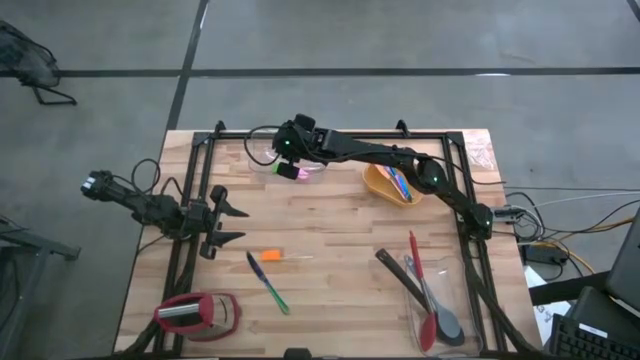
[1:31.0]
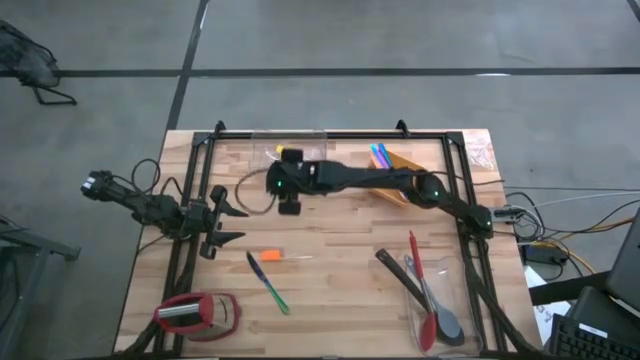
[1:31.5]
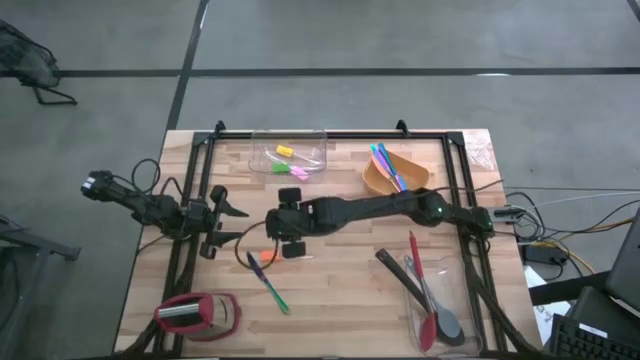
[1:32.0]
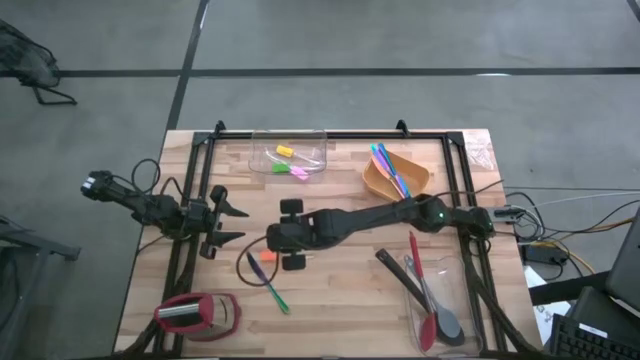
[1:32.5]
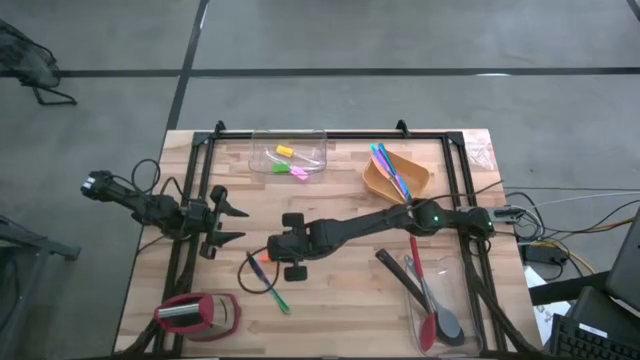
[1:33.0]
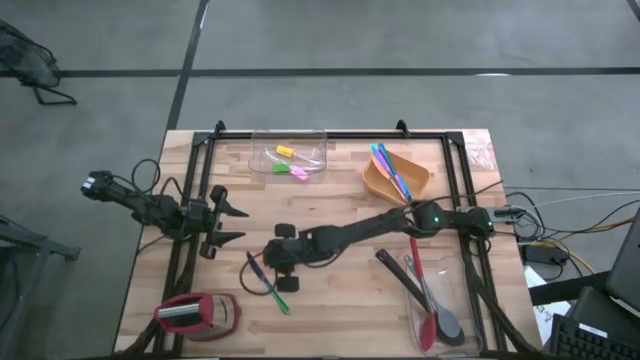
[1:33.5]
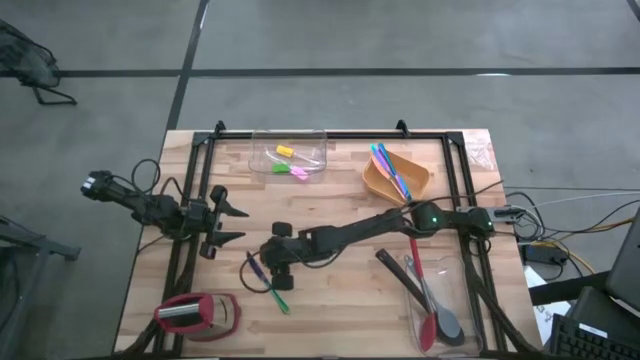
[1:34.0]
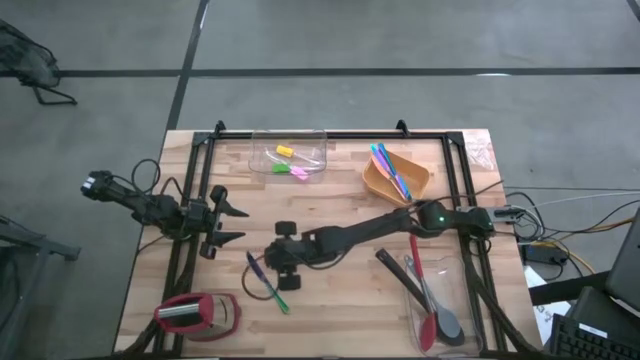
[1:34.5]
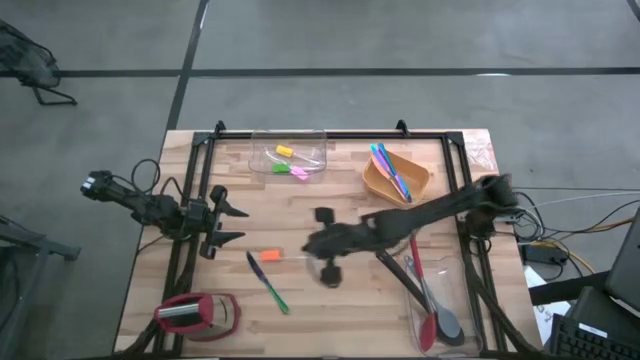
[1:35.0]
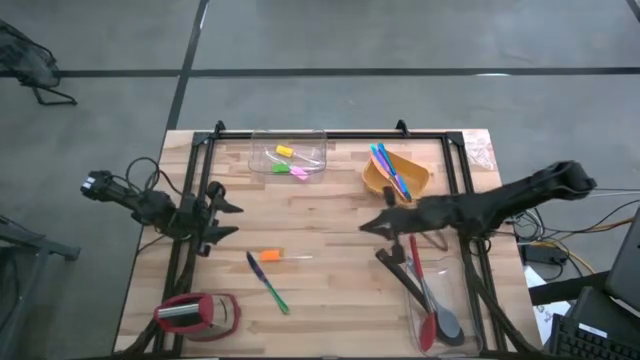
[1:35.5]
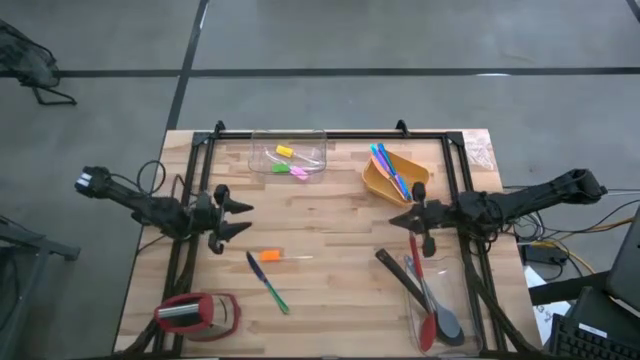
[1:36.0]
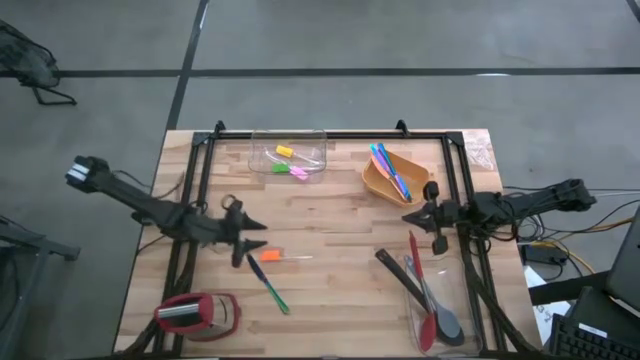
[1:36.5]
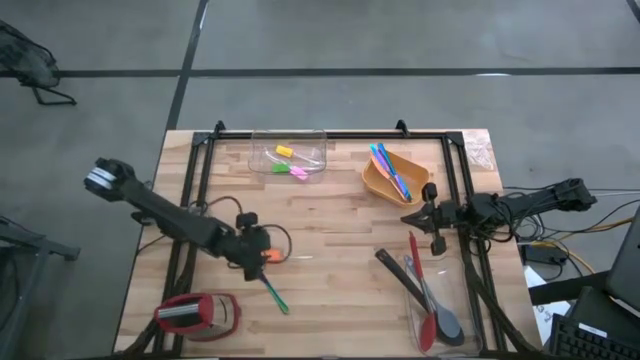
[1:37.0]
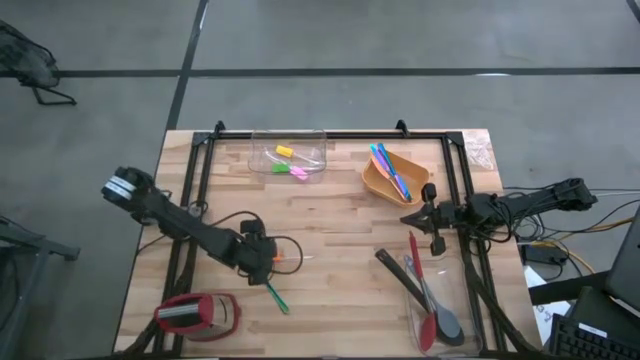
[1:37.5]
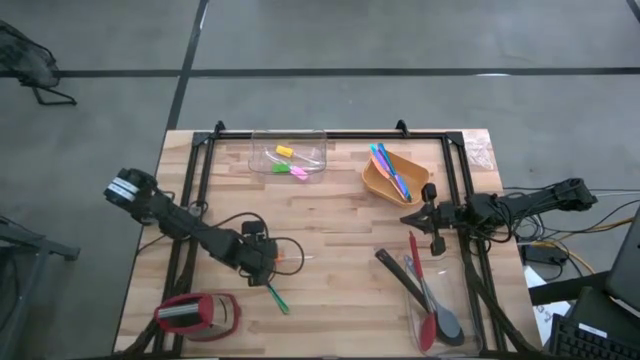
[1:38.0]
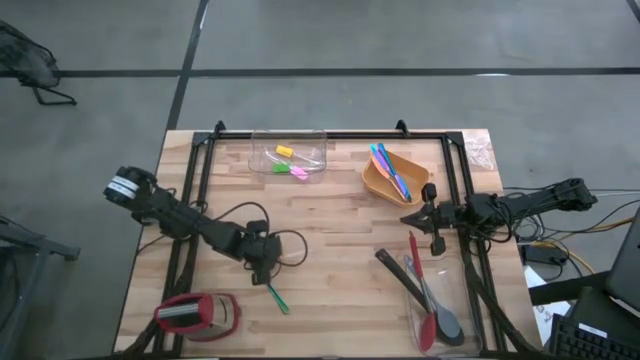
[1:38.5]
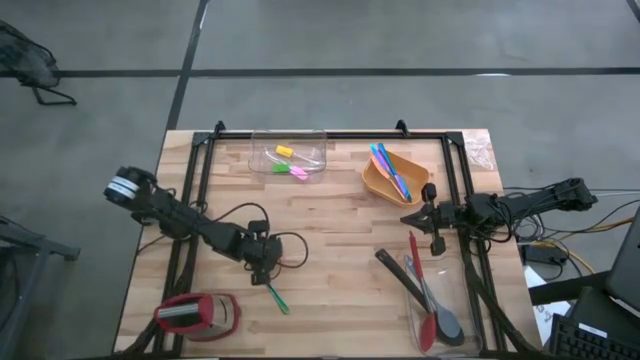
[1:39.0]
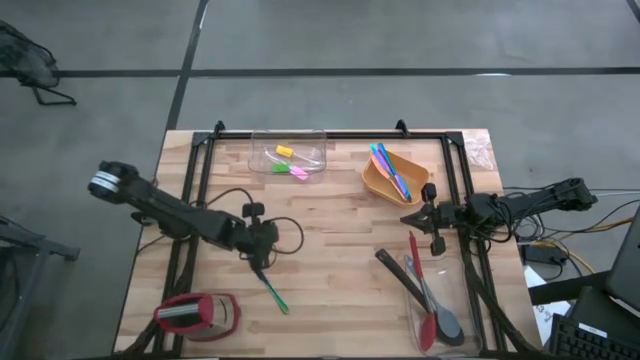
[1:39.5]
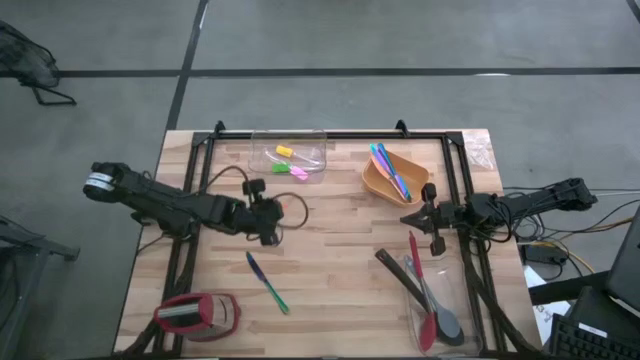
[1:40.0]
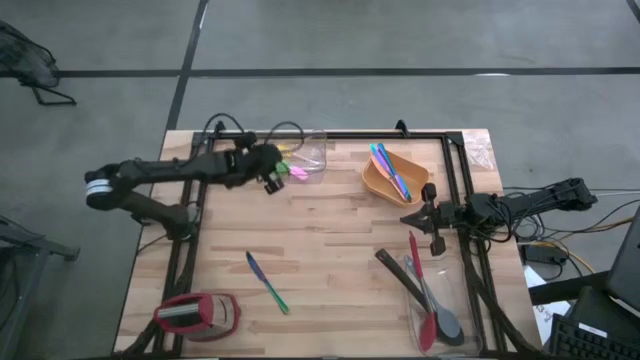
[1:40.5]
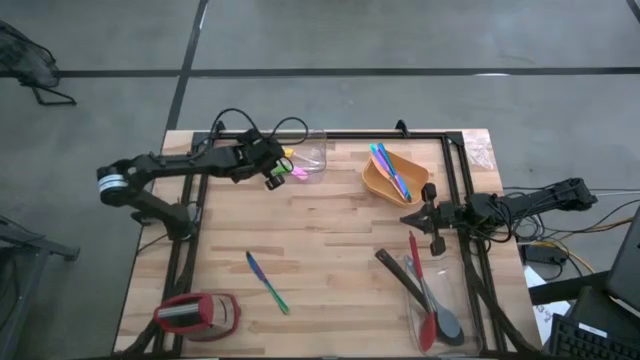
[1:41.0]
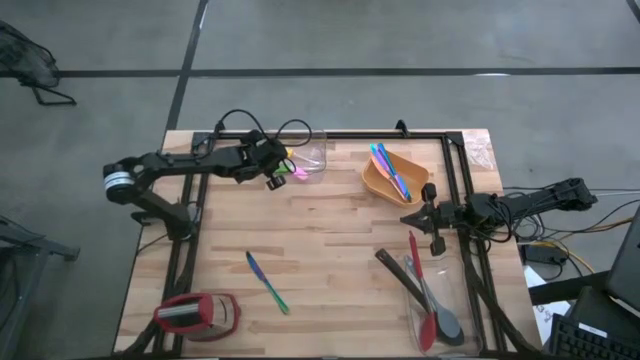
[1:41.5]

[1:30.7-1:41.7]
Task: Pick & Place Kitchen Items
Put the orange spatula into the top transparent bin

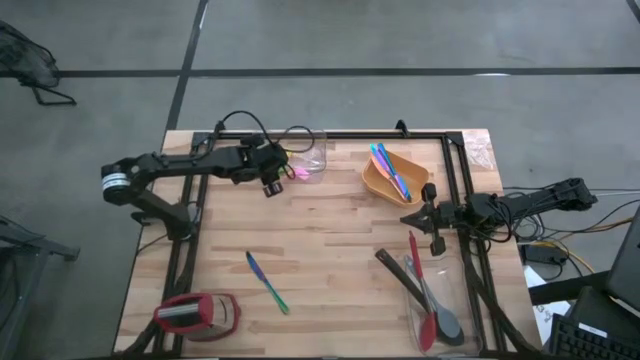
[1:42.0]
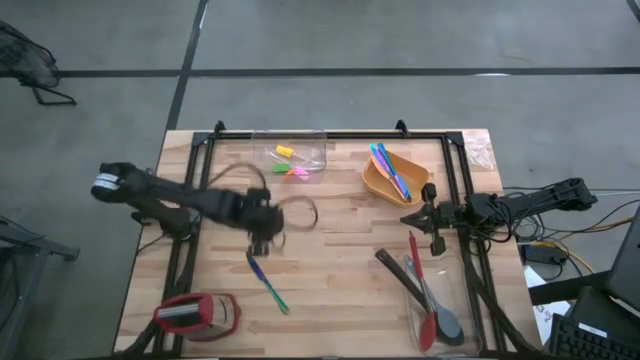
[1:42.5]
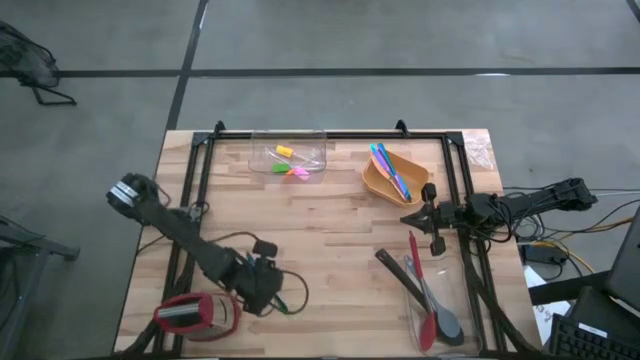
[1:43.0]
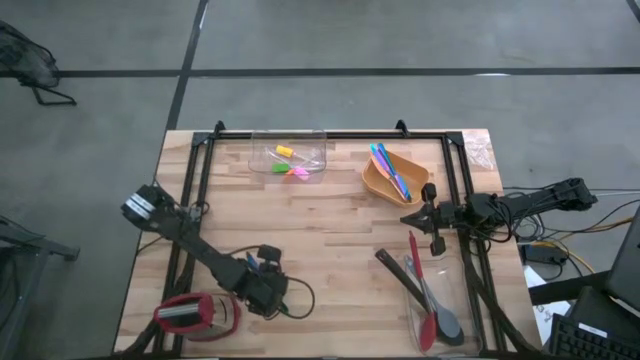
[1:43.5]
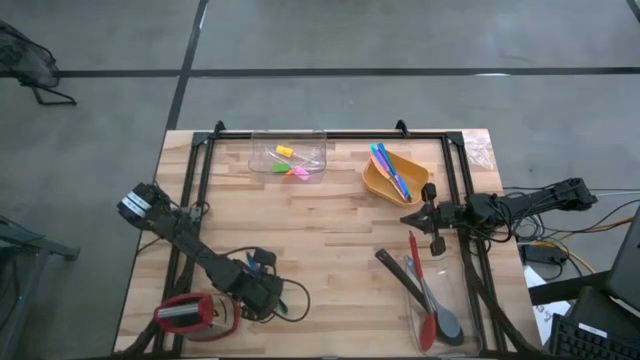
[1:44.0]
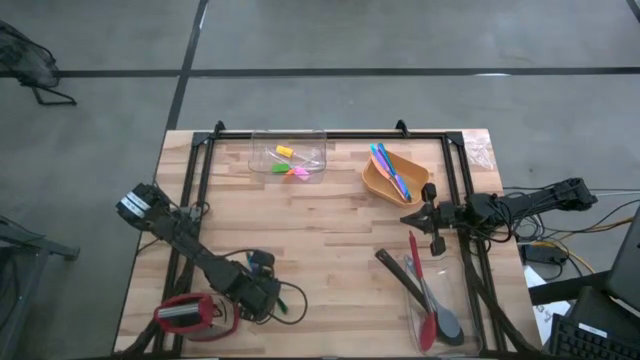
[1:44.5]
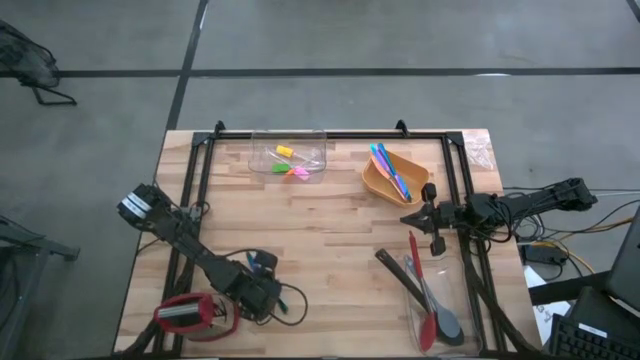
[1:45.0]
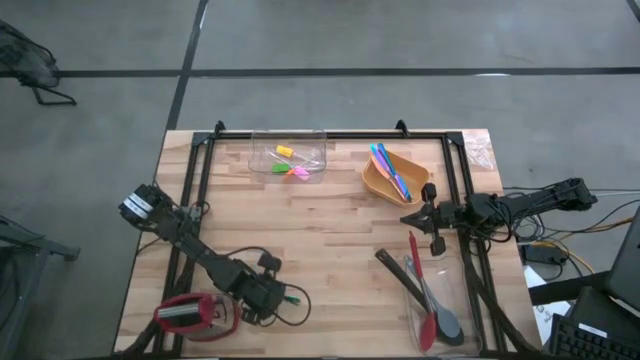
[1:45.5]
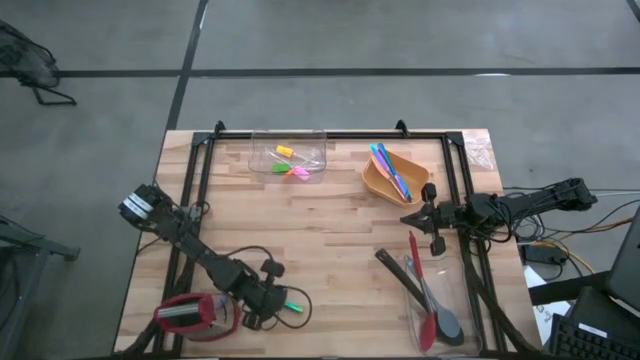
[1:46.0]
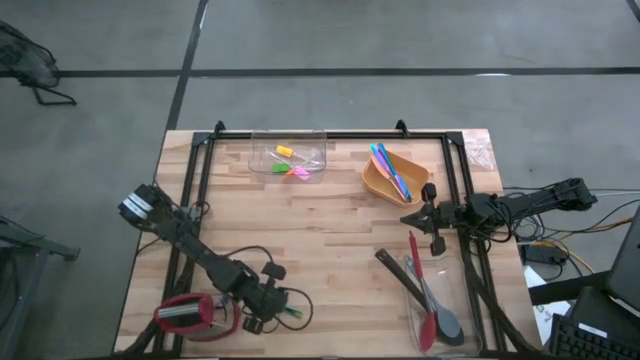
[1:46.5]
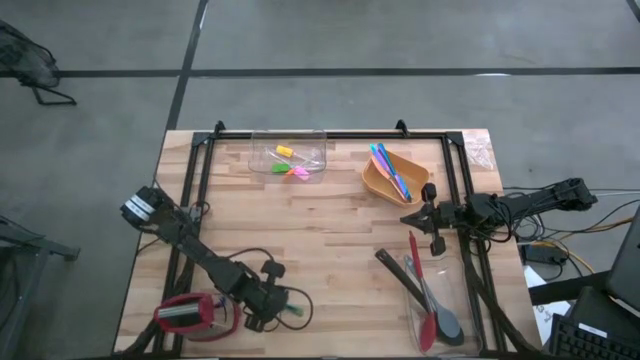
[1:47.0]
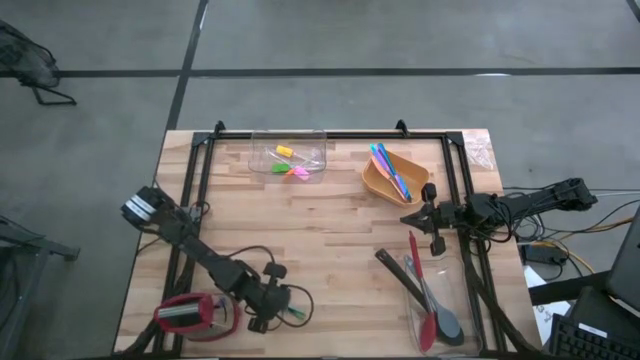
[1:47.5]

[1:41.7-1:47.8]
Put the blue kitchen knife into the yellow bin

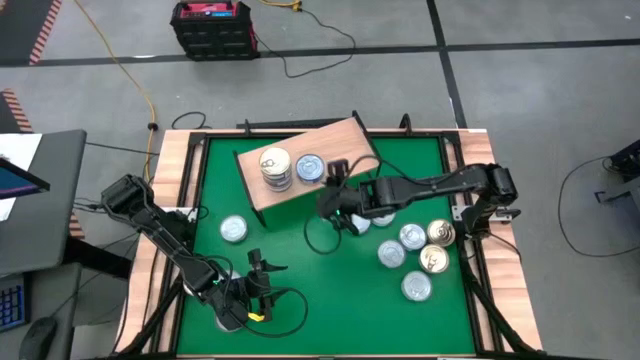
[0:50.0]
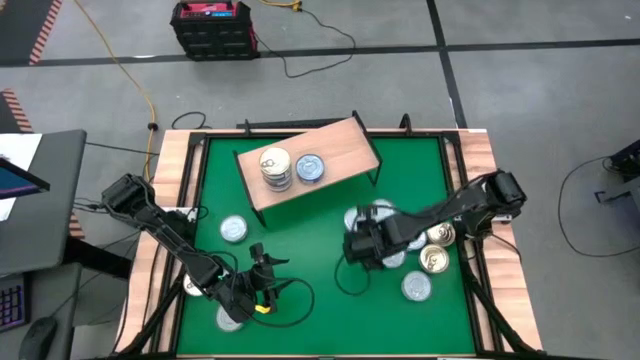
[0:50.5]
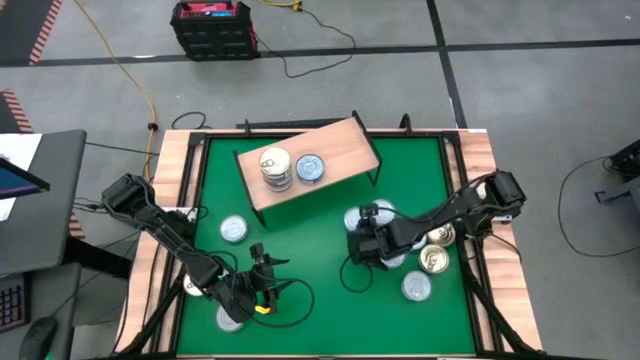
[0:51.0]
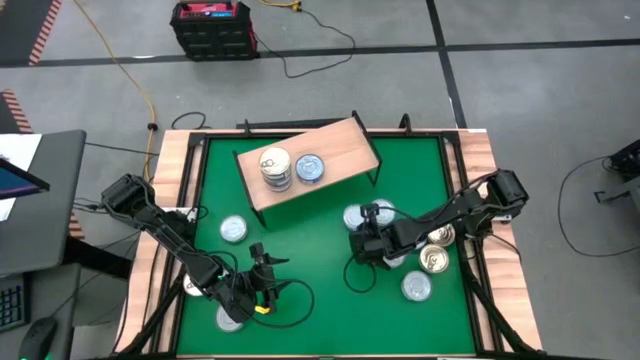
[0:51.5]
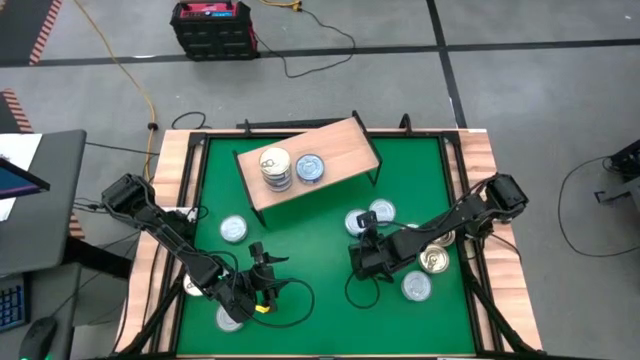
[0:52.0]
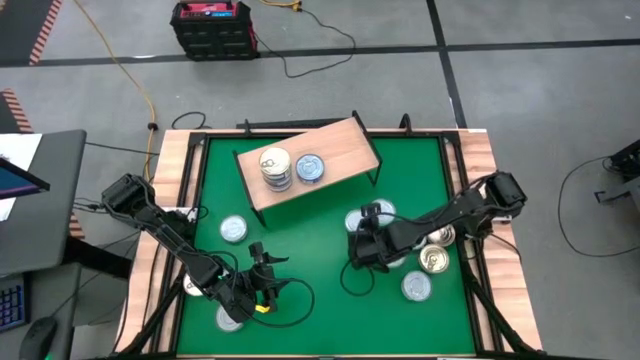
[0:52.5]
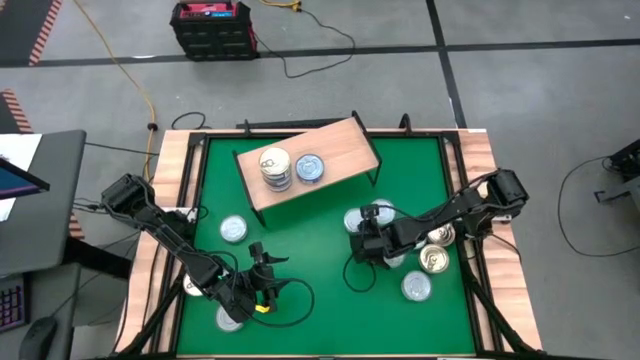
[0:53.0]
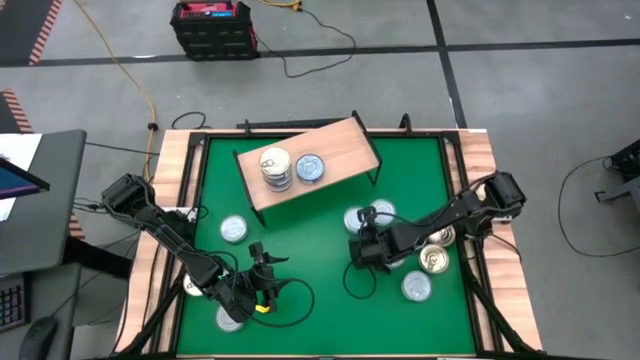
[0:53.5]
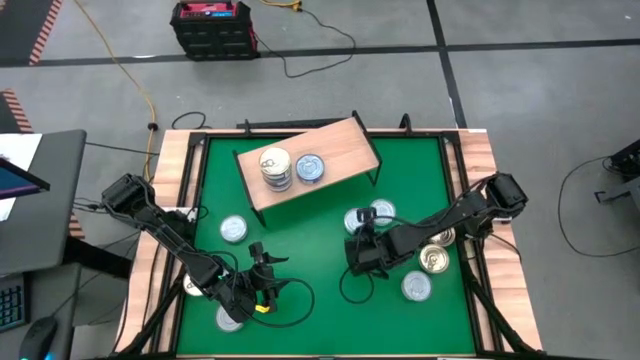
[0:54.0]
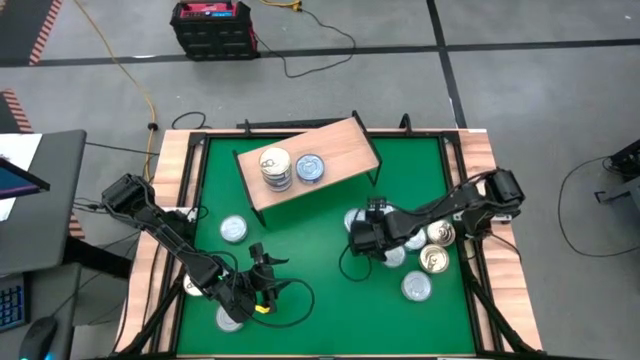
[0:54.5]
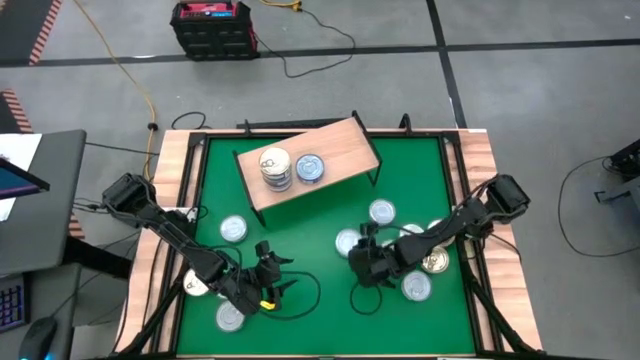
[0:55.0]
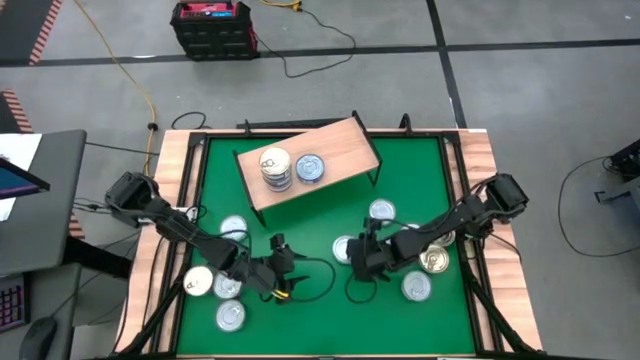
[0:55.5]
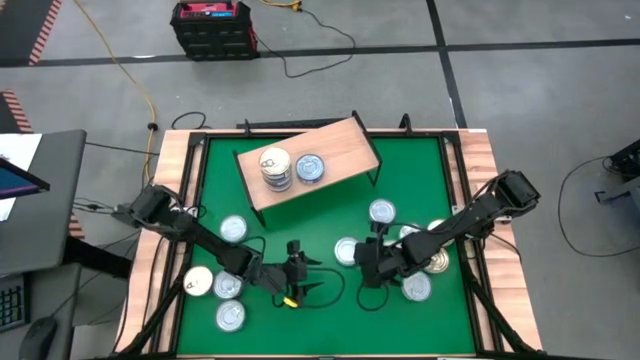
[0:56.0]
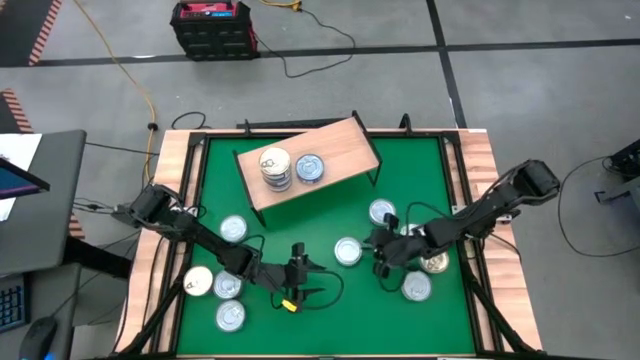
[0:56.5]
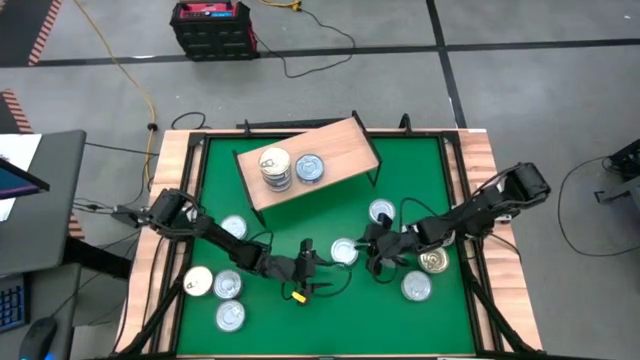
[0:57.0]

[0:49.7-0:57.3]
Task: Stack canned seafood by type on shelf
Put the green white tuna can on the shelf
